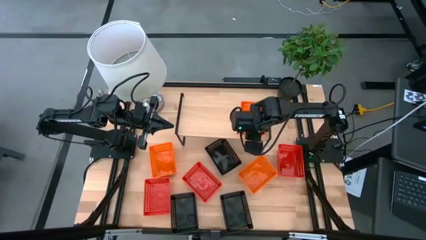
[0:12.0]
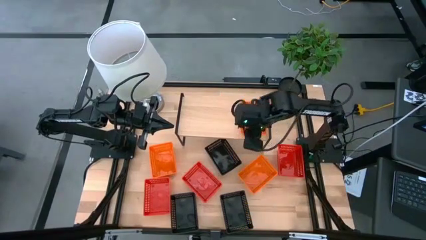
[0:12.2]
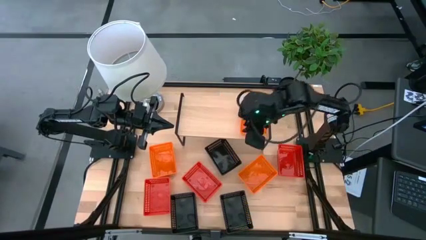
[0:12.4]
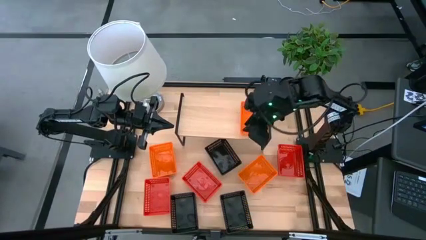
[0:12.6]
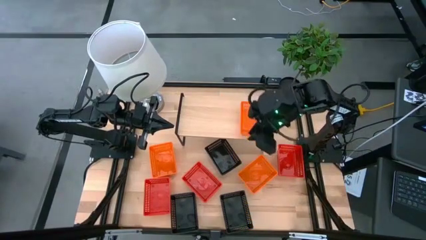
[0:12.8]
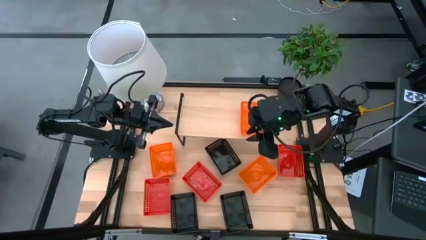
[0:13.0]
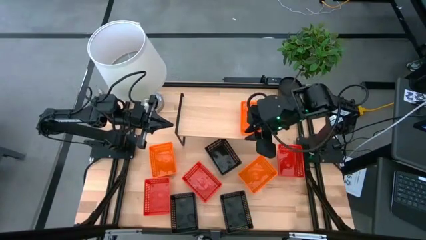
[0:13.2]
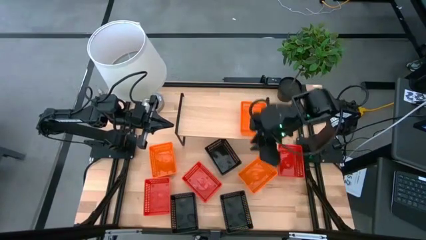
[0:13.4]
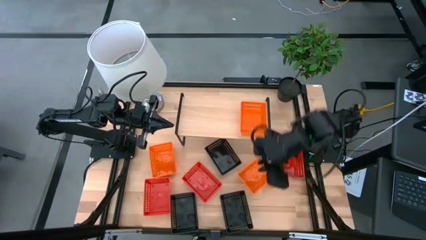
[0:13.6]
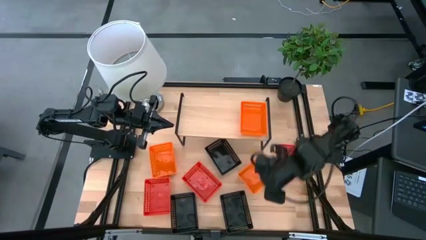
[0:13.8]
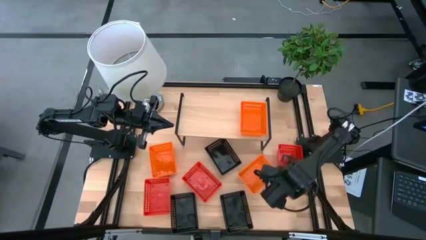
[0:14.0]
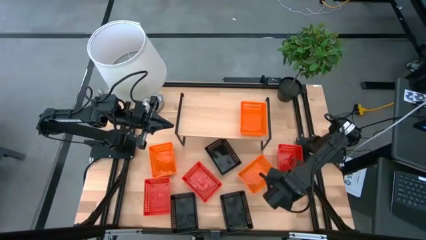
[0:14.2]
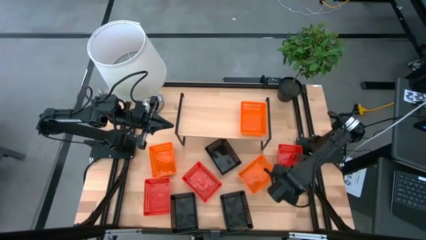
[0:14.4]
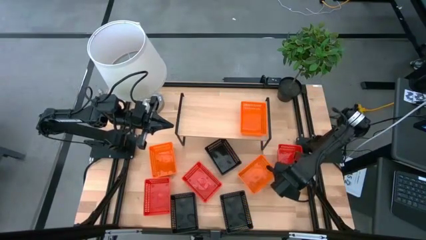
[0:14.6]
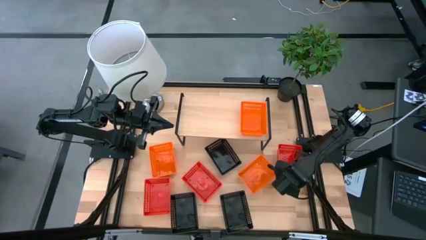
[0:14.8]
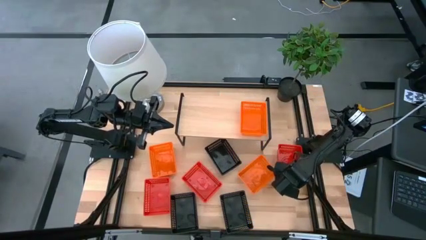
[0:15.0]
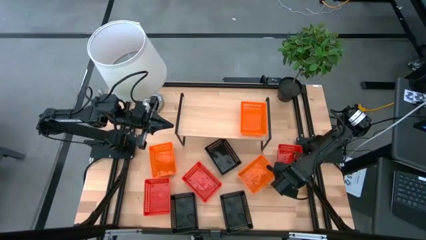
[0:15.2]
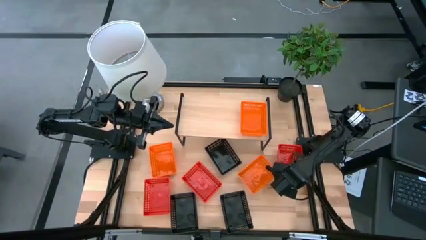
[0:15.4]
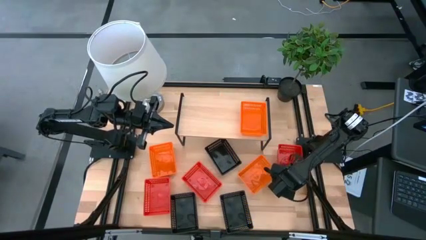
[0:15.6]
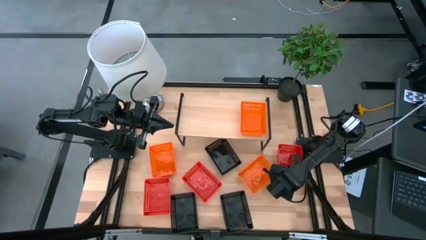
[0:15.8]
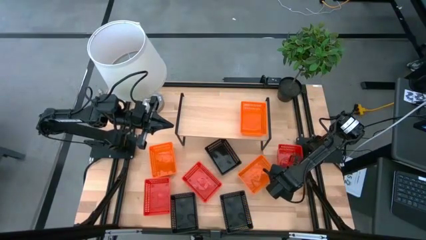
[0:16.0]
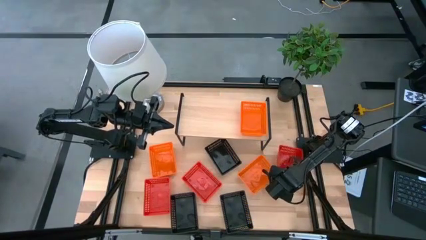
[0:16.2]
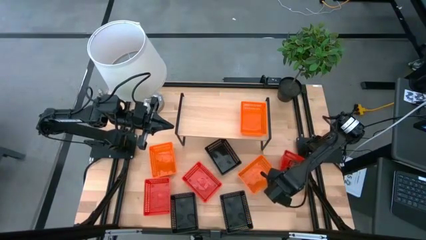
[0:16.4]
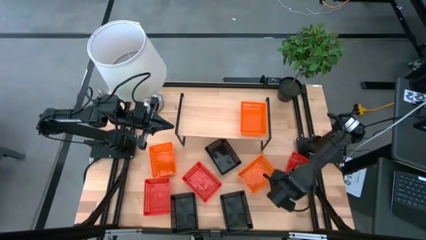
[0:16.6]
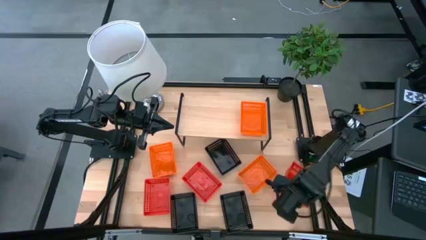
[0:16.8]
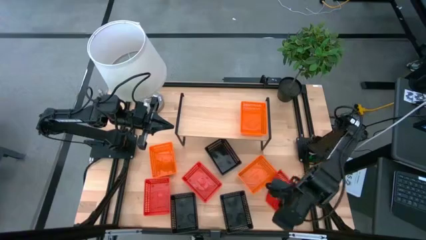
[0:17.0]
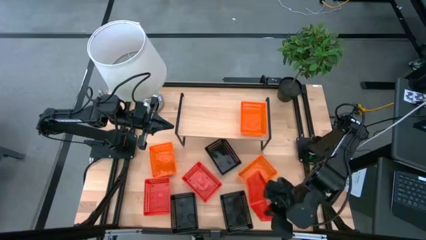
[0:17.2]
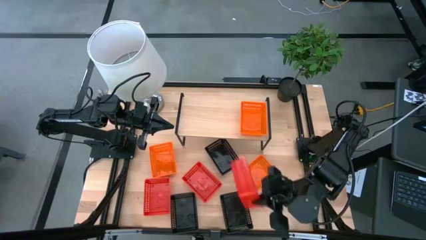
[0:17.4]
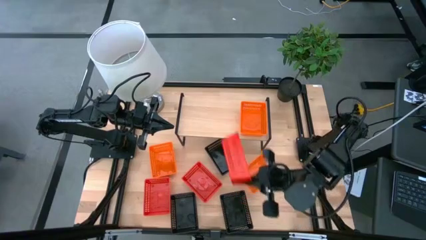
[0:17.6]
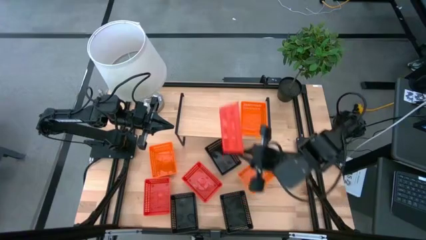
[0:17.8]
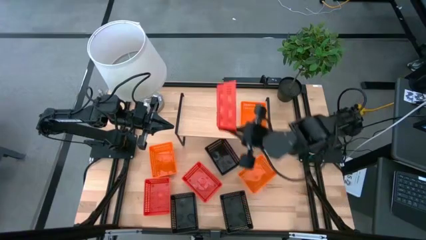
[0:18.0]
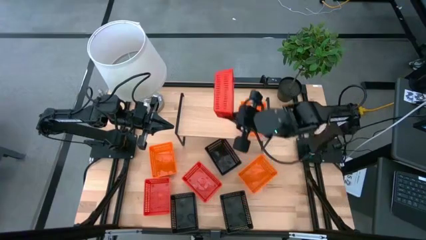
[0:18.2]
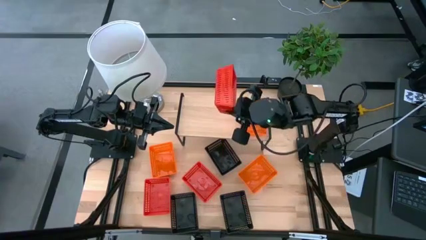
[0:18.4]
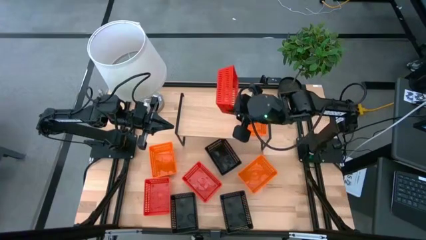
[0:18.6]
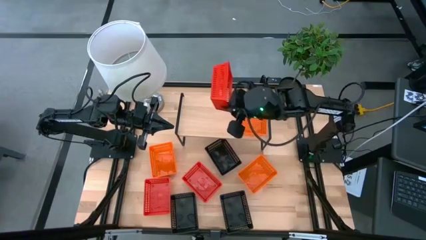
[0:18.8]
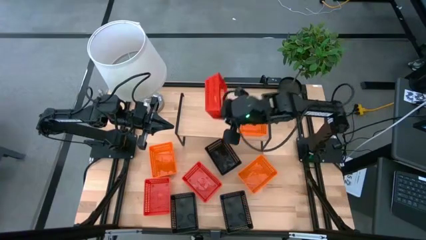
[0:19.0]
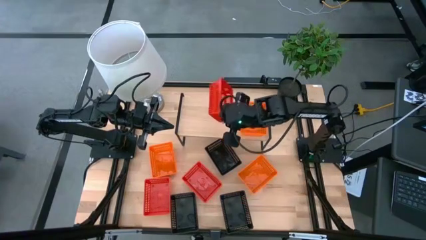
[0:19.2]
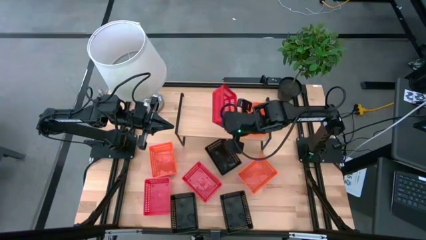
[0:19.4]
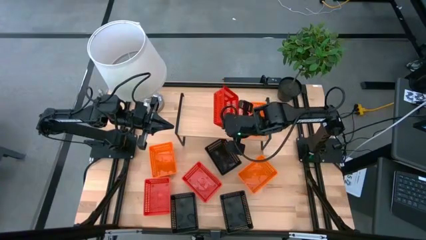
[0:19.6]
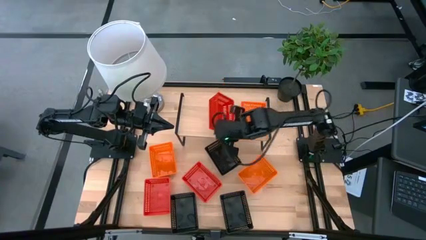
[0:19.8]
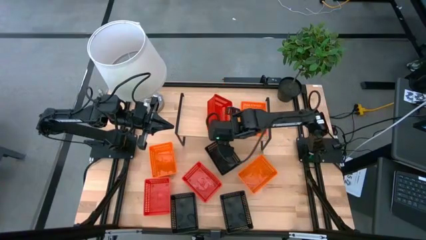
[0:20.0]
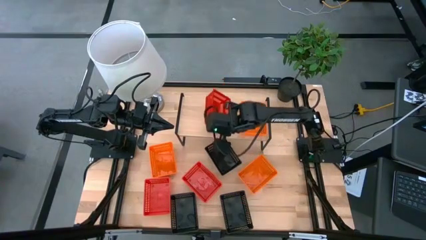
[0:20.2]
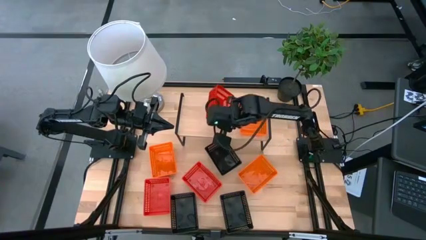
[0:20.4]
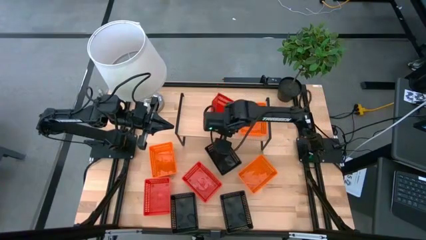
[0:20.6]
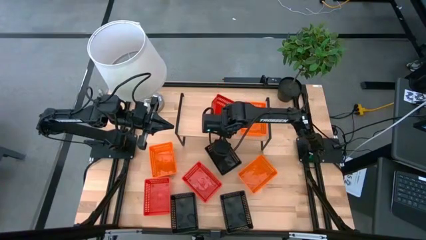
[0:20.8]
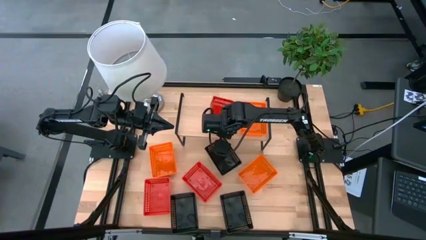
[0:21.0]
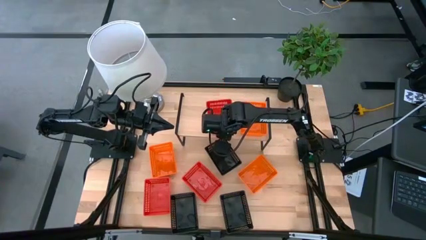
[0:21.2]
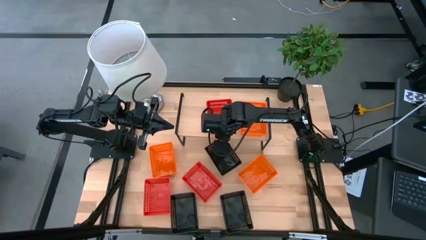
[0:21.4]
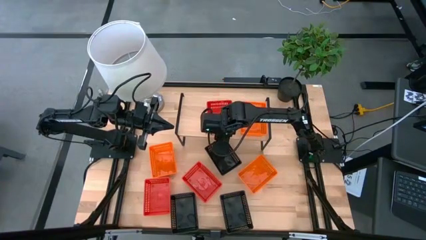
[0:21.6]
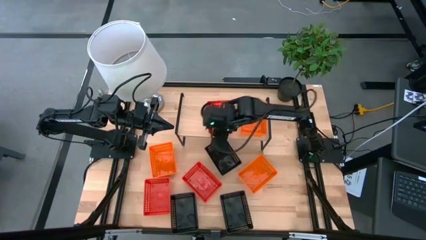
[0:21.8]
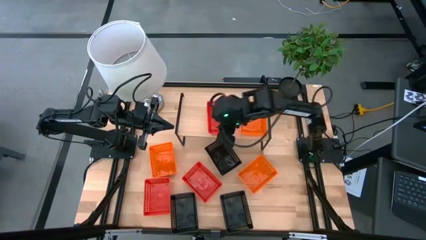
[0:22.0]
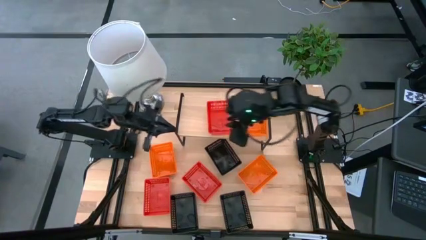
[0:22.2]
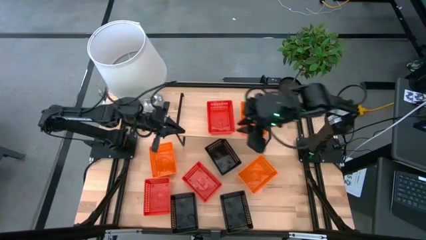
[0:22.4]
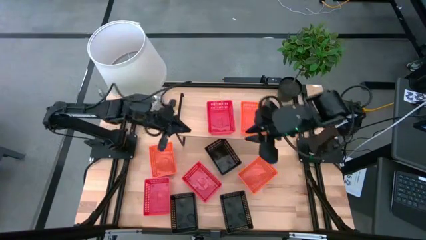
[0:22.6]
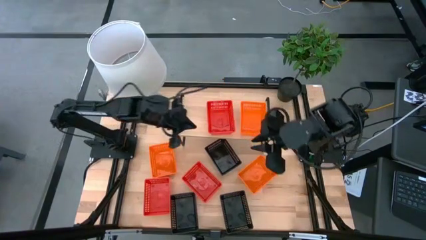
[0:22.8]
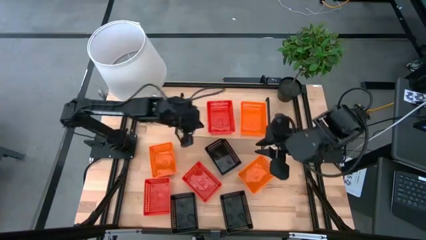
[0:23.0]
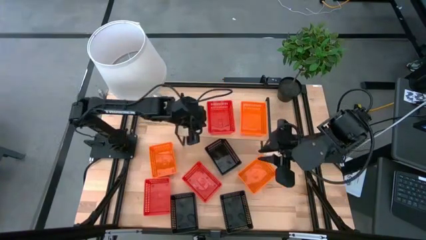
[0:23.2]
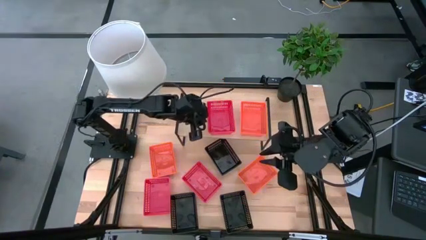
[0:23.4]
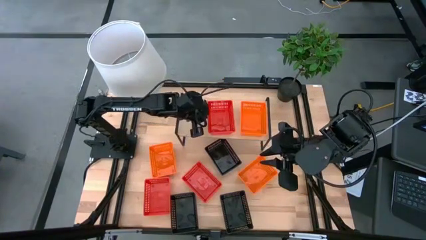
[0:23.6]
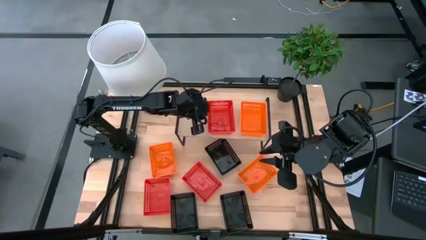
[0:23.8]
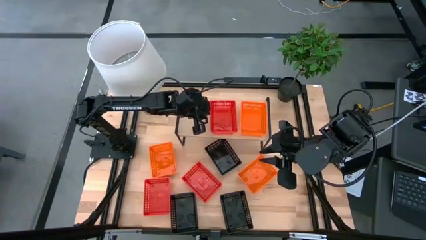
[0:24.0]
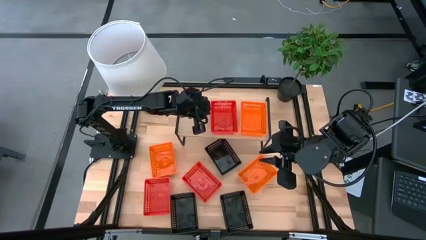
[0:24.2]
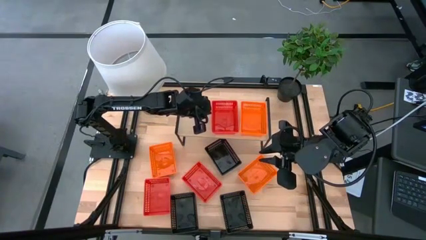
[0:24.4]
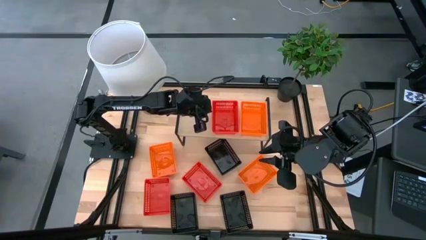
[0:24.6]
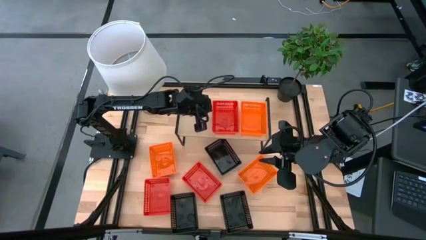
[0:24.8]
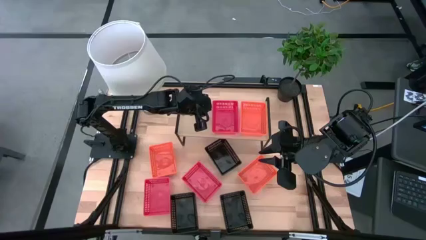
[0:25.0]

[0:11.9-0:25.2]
Task: Stack baskets on shelf by color
Put the right red bin on the shelf

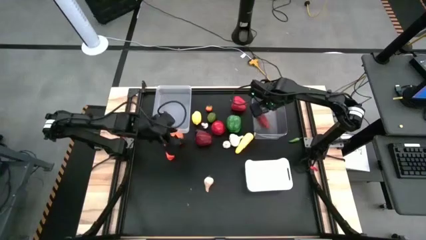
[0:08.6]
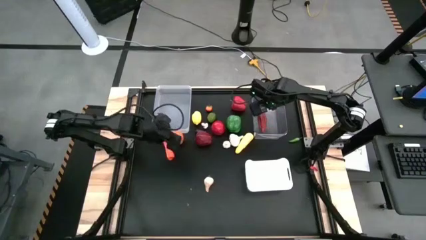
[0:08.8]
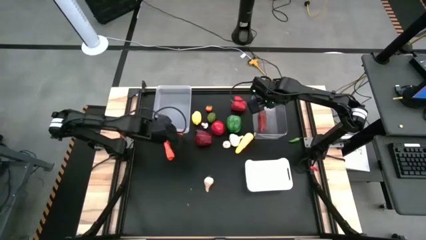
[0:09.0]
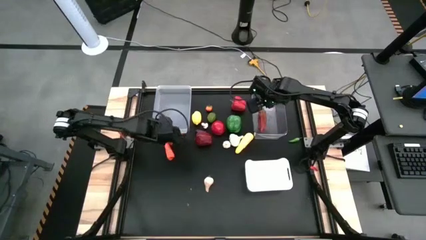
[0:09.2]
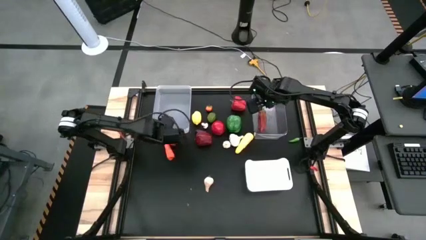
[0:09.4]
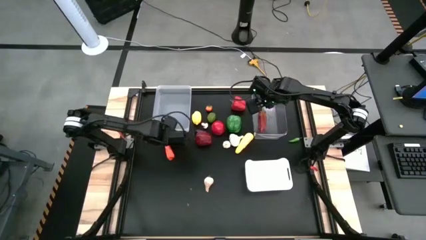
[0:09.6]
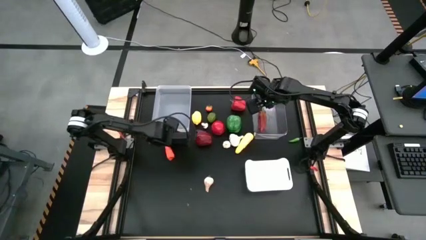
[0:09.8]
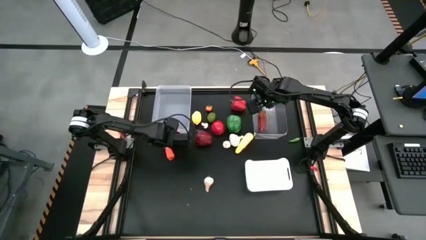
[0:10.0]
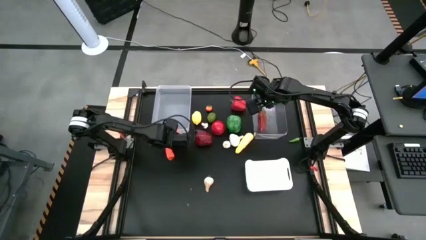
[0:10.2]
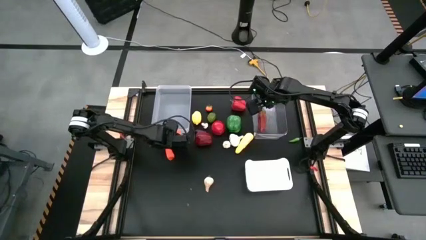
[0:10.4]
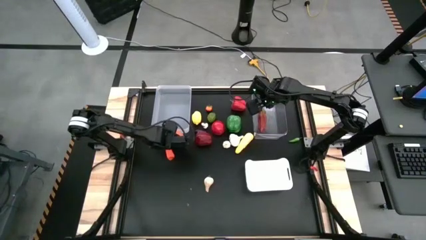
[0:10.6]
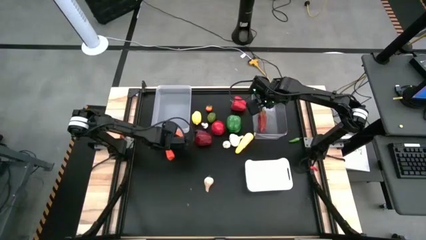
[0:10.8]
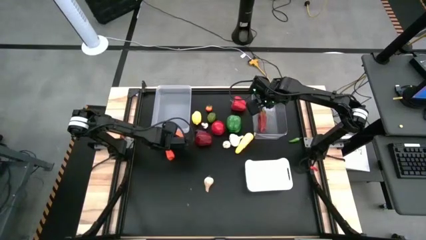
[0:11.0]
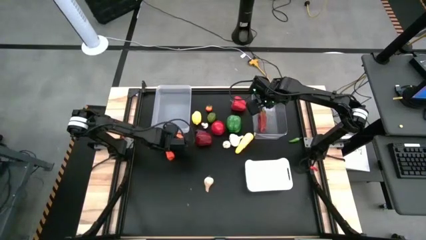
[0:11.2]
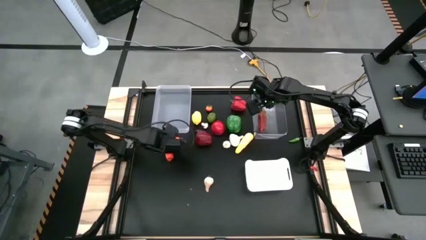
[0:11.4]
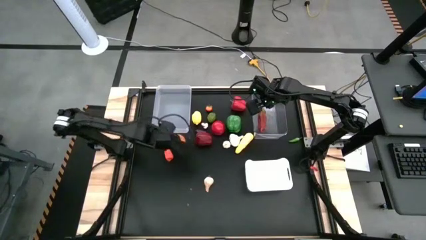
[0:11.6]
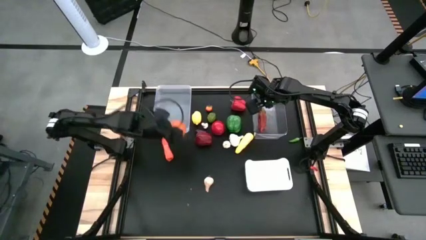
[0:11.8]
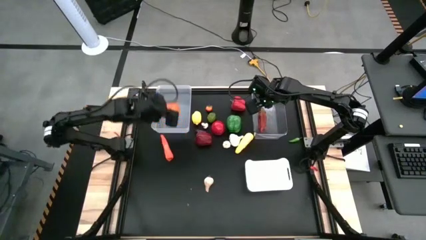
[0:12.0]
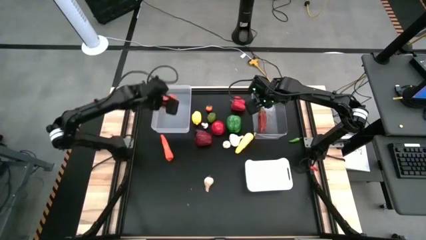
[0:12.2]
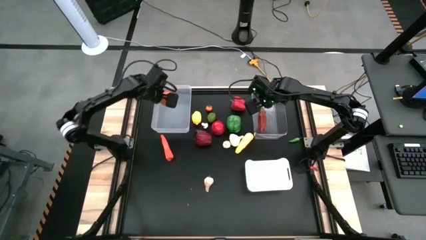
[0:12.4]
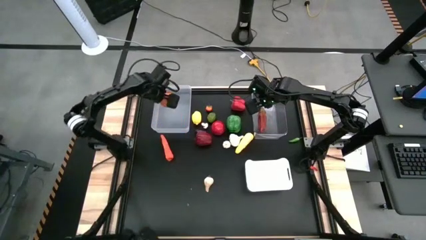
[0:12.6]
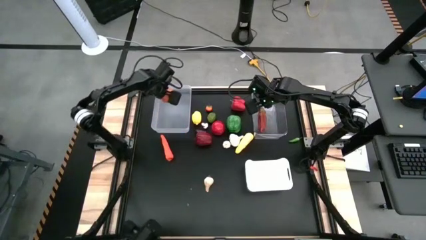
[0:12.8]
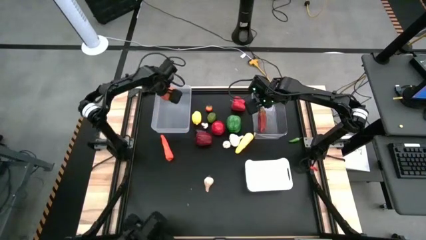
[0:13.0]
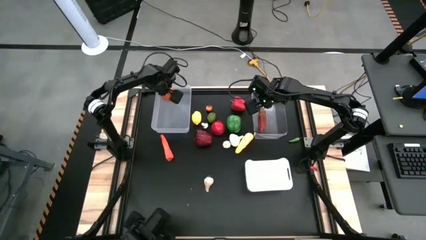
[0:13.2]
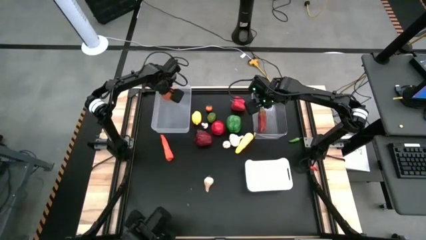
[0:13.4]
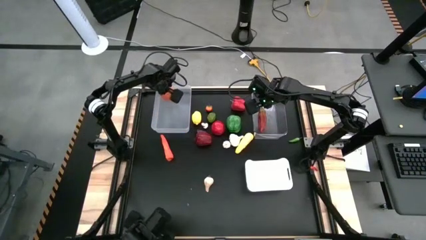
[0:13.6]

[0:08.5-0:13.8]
Task: Sort produce into baskets
Put the orange into the light white bin
